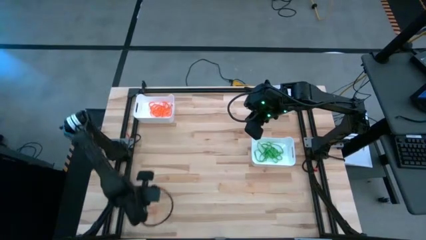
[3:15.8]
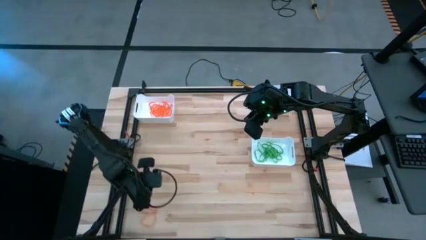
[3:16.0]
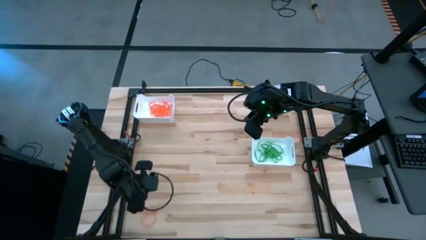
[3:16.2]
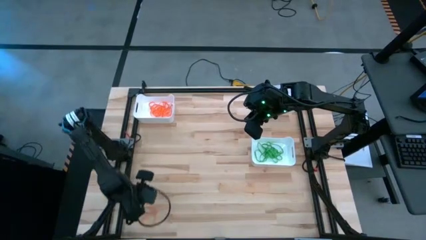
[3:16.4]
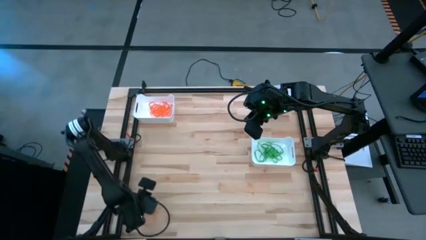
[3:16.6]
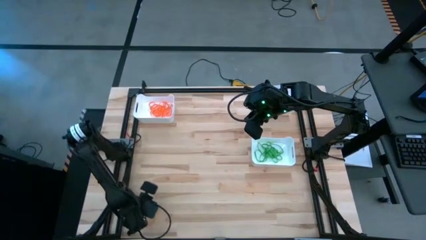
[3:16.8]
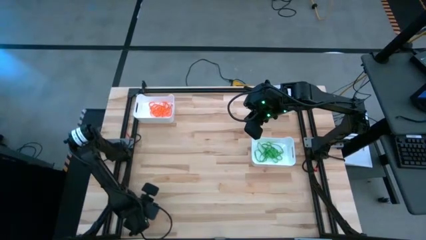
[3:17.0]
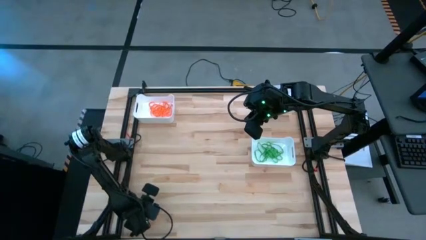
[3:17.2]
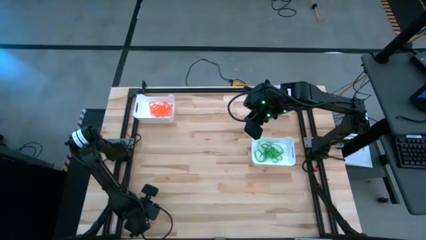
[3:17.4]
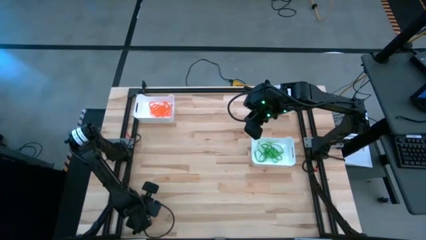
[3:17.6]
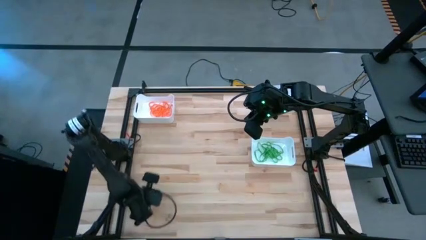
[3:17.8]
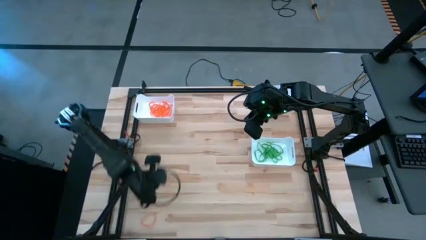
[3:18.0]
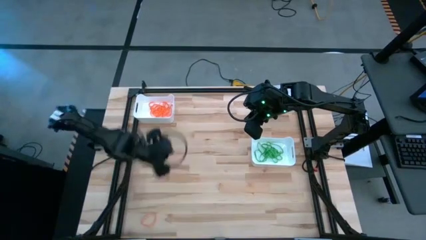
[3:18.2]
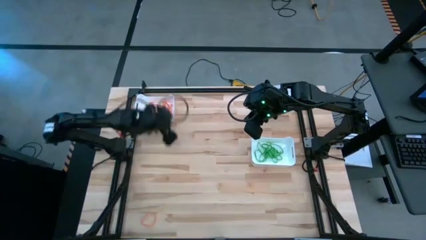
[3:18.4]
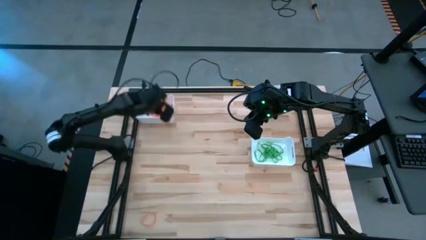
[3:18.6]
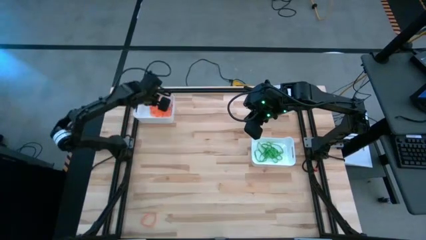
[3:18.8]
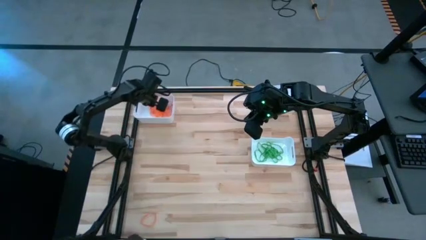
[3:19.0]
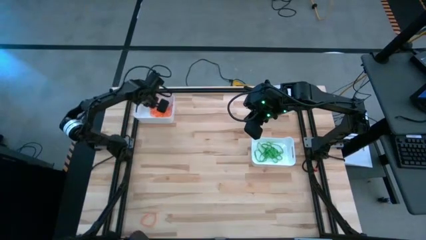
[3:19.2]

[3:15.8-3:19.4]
Task: Sort rubber bands into baskets
Put the orange rubber band into the top left white bin

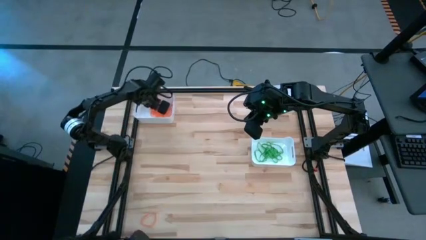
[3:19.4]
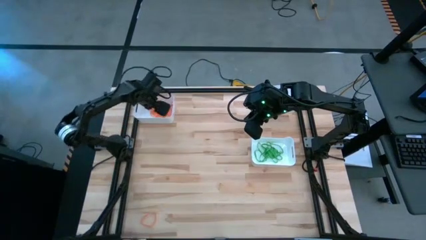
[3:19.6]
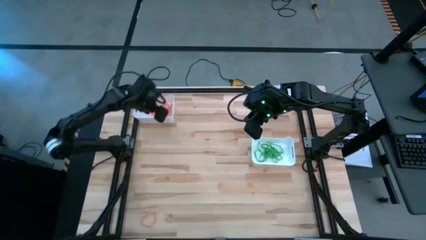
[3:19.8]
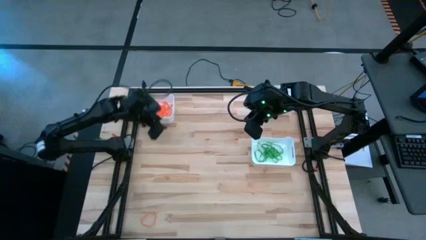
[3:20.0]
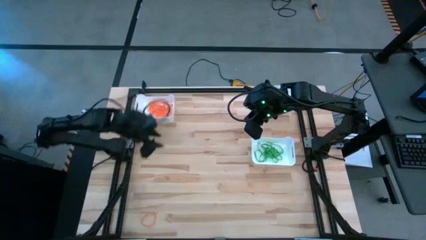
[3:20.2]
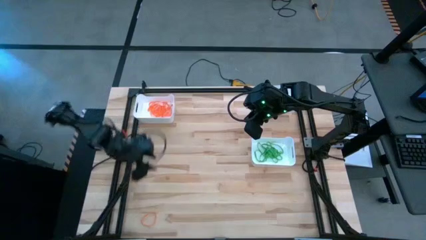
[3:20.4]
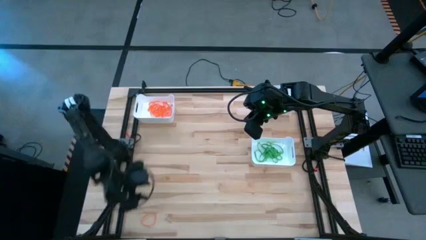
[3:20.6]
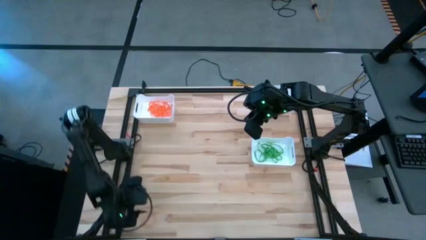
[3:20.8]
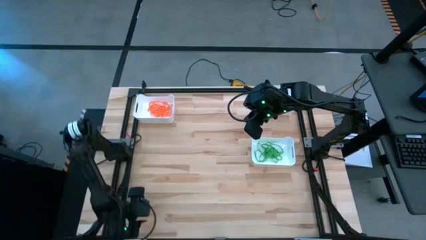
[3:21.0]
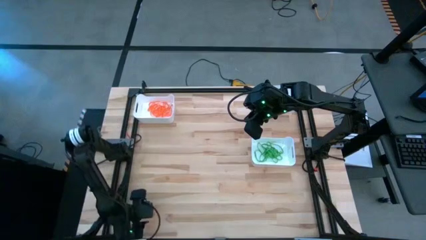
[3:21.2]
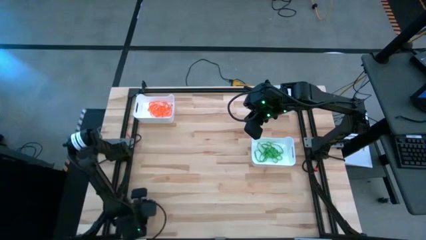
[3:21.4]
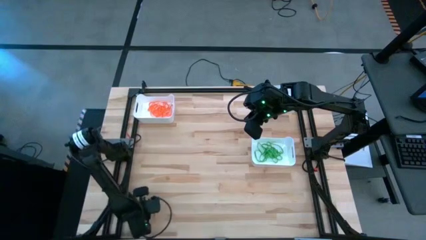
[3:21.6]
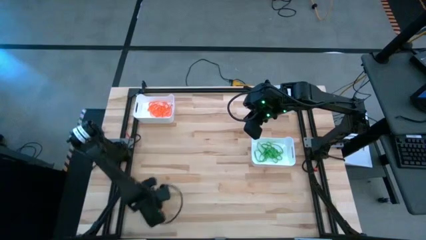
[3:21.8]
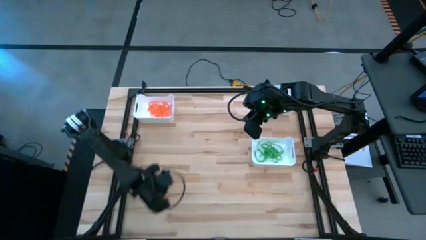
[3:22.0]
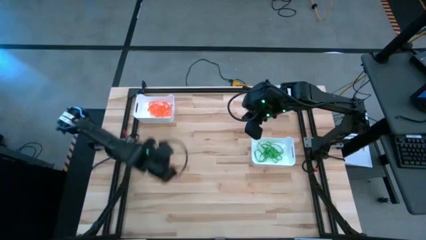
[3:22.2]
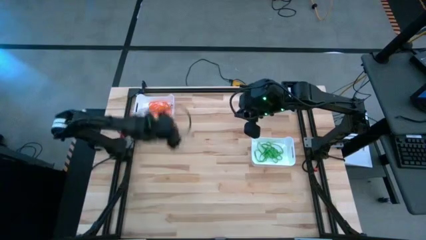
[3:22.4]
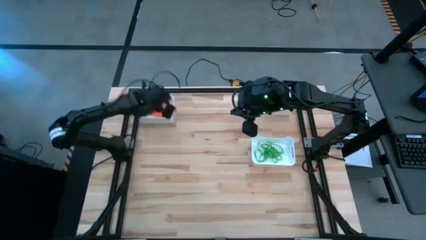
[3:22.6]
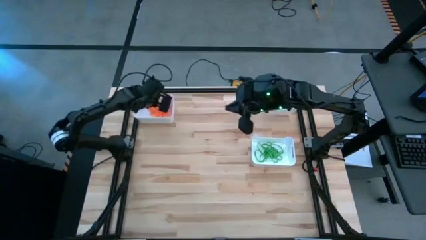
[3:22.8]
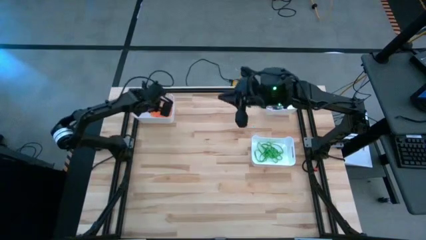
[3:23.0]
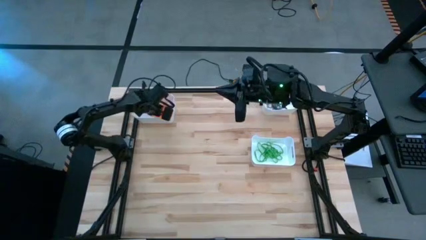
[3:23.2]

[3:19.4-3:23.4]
Put the orange rubber band into the top left white bin

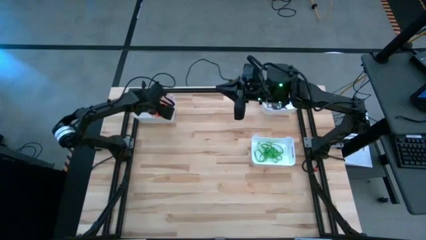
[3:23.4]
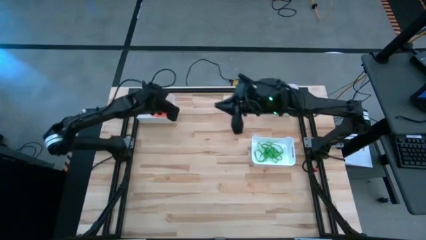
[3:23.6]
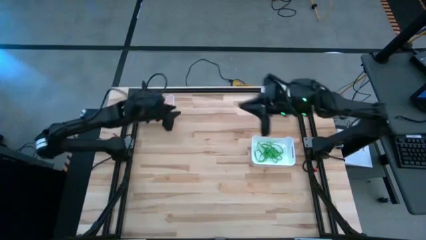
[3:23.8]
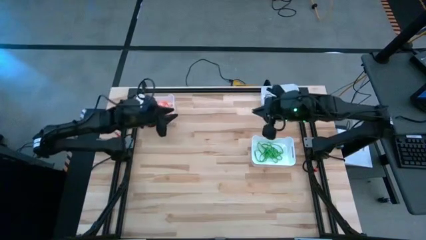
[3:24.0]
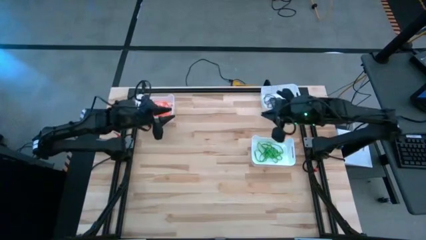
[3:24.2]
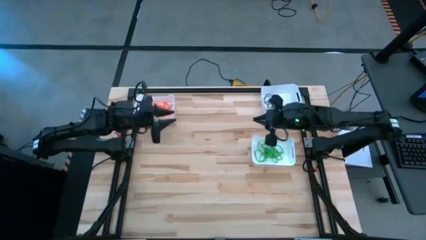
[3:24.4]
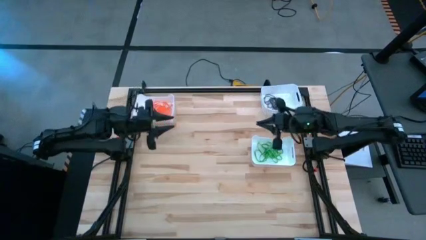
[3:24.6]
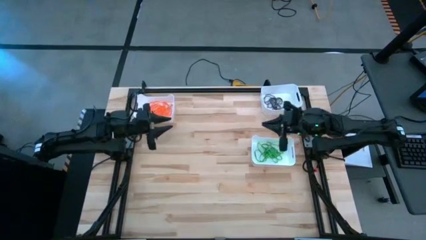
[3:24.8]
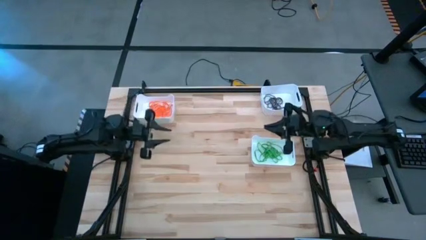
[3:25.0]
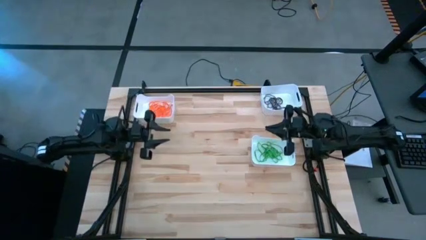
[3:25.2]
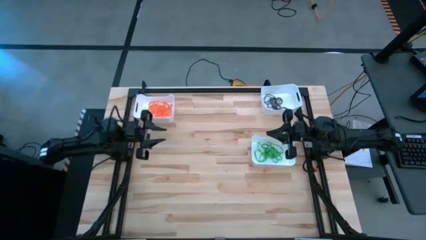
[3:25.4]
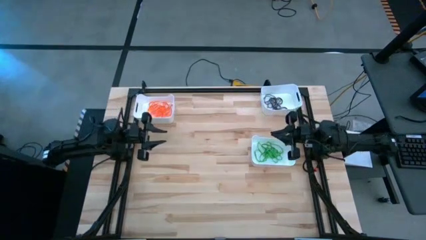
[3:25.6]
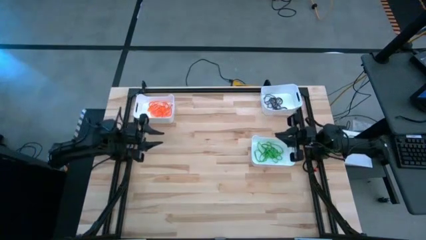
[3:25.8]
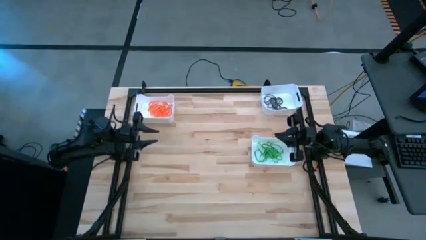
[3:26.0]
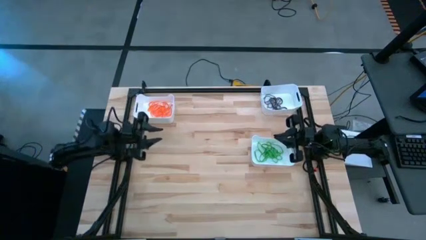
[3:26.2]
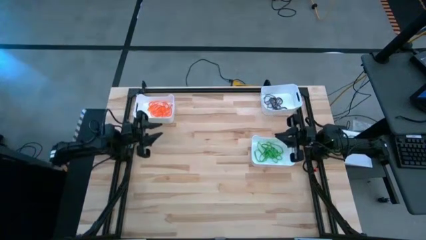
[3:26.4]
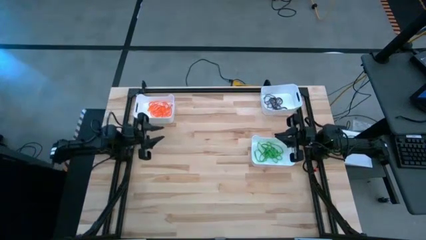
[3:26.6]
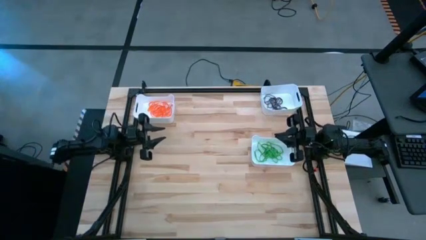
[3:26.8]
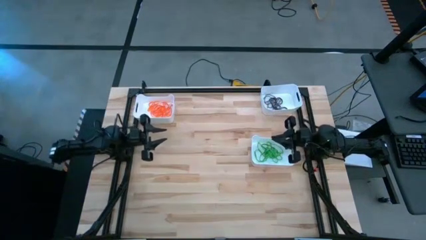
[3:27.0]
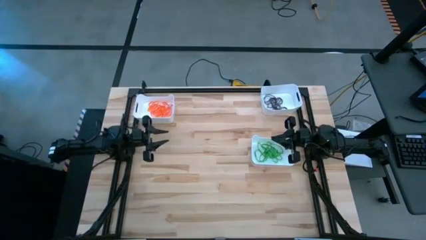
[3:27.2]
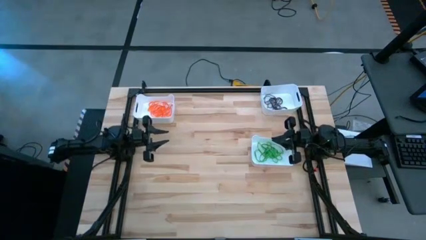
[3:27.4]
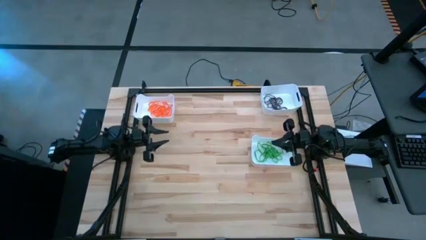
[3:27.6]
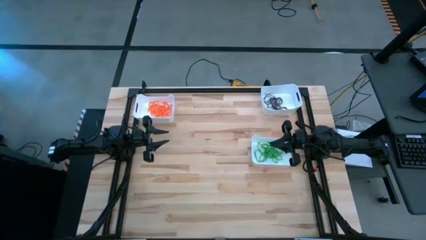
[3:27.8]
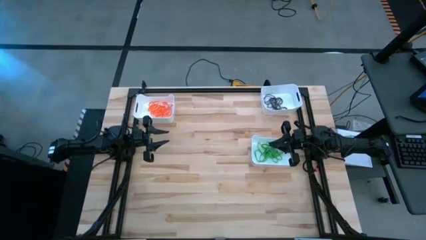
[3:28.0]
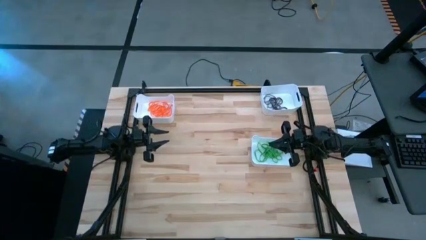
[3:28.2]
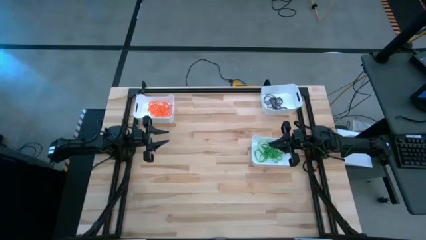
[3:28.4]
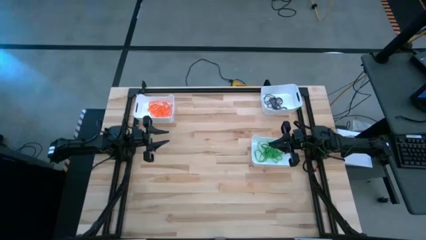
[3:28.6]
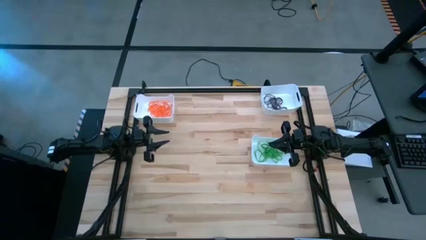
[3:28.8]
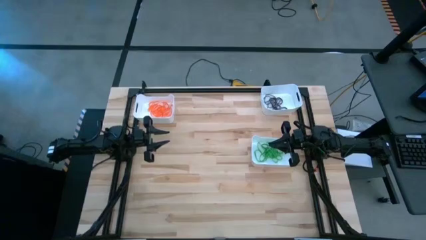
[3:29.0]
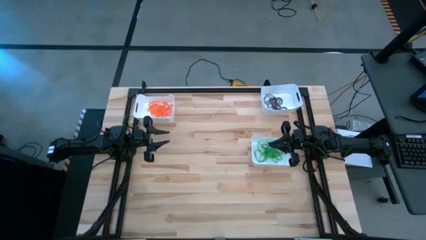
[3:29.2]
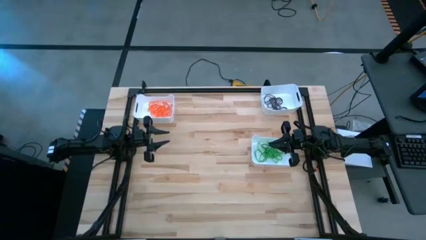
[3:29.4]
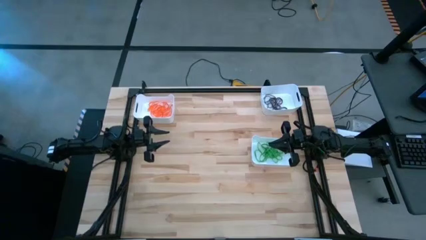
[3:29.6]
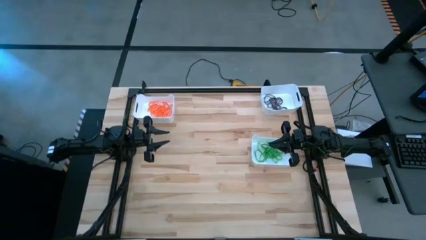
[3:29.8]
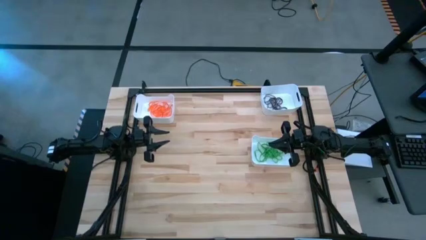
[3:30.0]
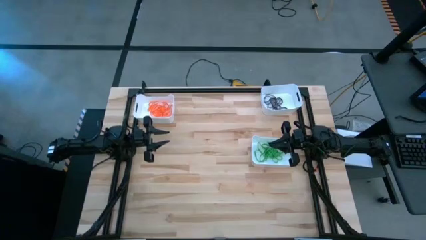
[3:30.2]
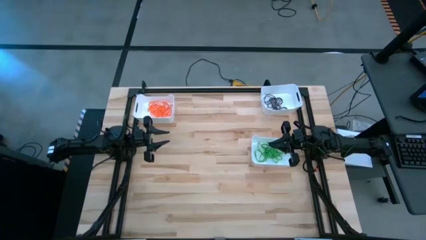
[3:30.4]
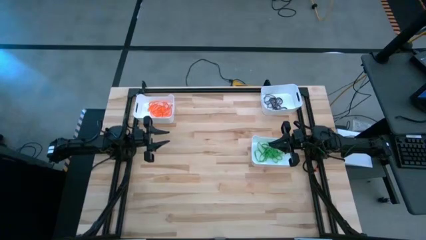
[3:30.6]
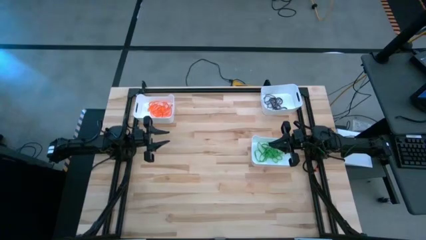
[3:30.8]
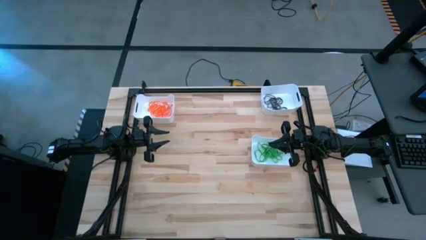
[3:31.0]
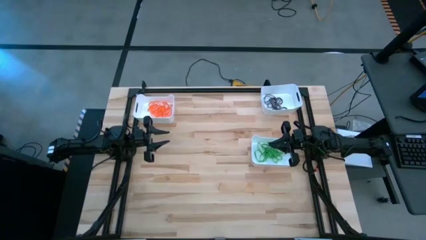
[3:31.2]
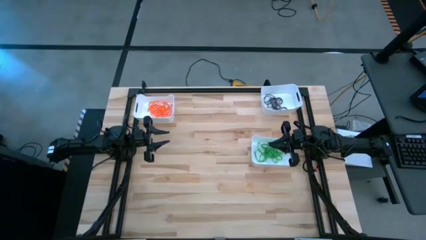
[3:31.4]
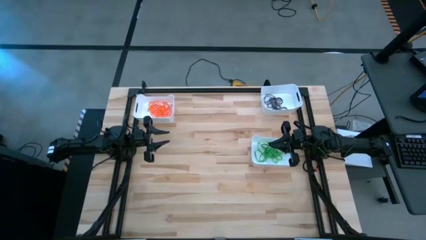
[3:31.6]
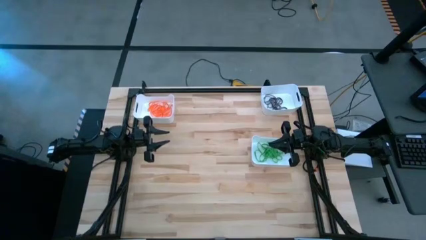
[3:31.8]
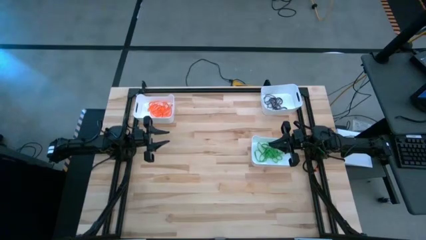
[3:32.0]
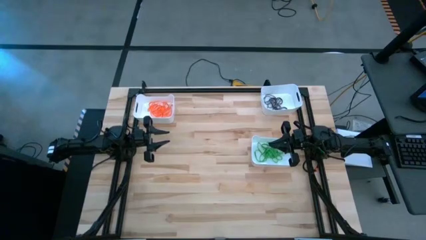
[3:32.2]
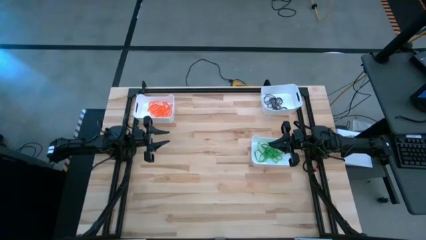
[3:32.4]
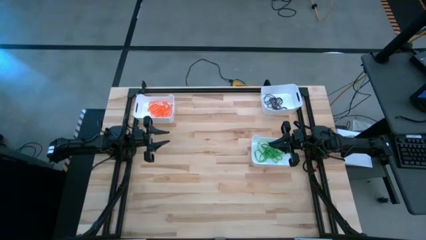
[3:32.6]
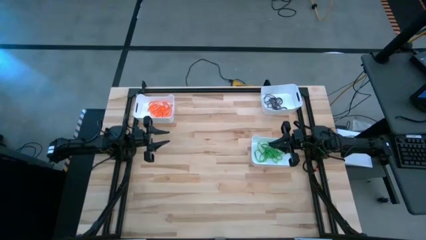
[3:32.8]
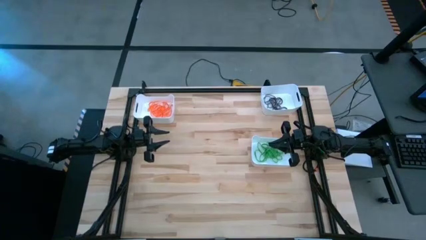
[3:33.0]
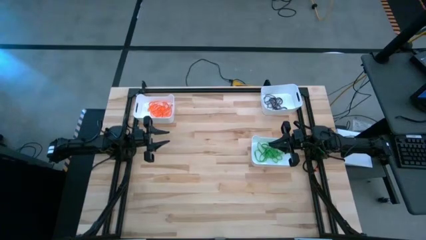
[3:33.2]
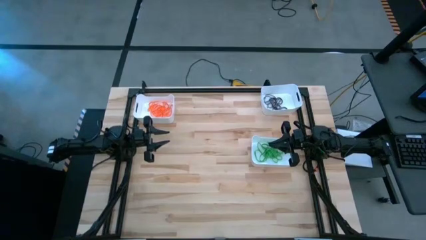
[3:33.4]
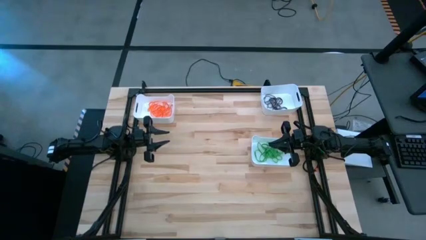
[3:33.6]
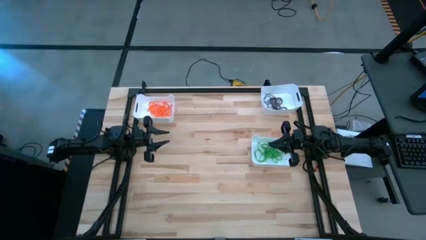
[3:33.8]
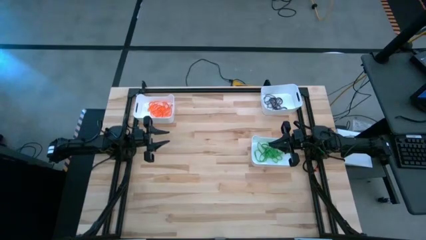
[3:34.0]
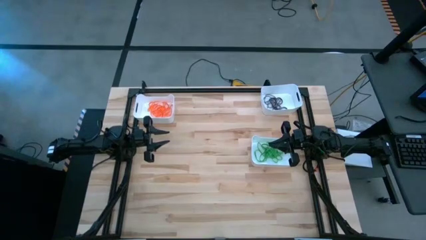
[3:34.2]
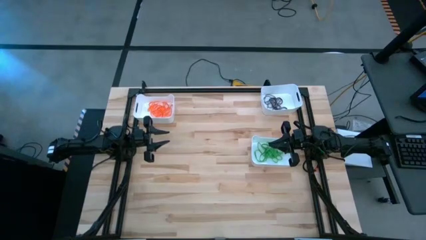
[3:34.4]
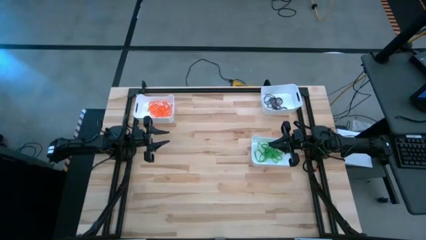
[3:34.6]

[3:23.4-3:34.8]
Return to Home Position
